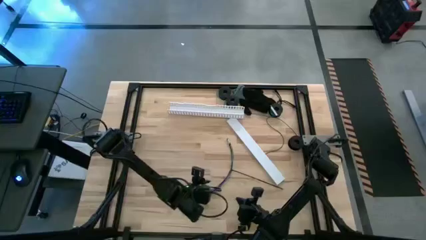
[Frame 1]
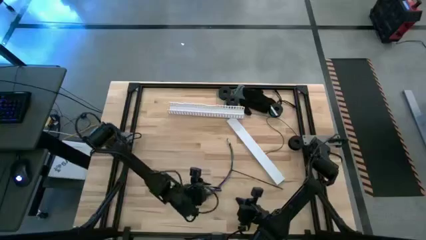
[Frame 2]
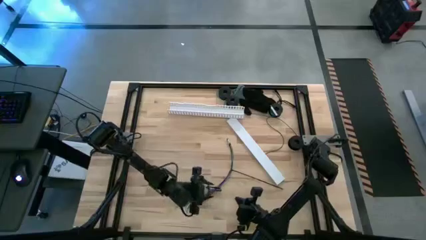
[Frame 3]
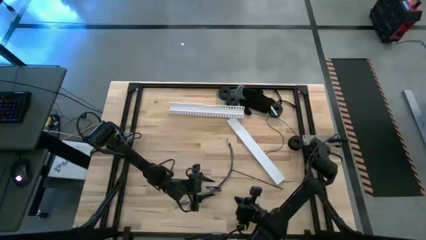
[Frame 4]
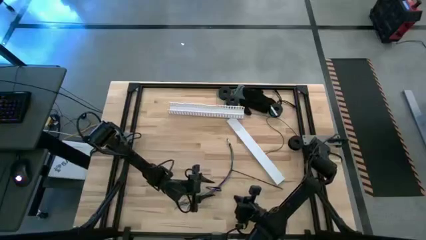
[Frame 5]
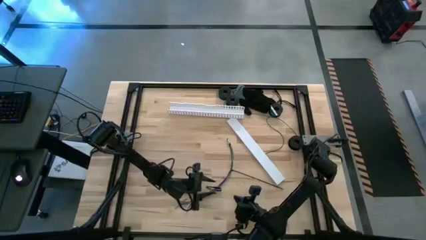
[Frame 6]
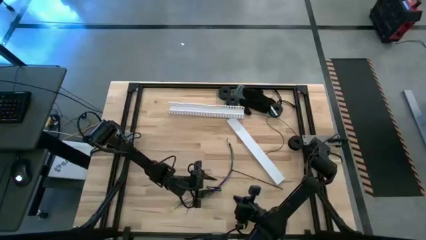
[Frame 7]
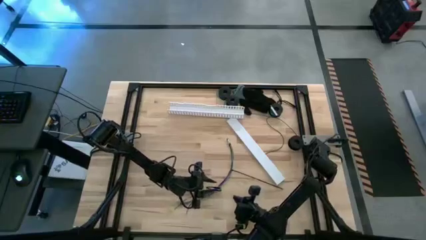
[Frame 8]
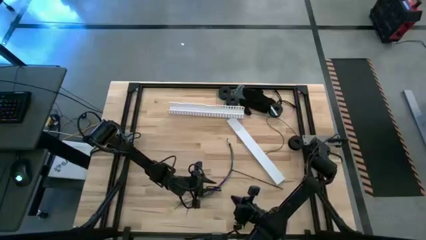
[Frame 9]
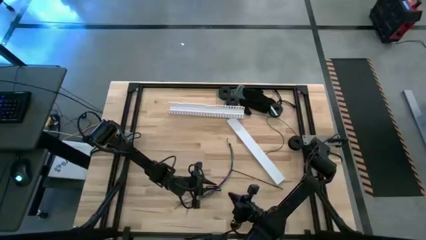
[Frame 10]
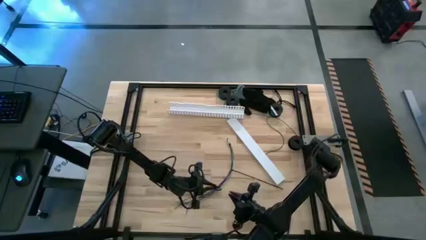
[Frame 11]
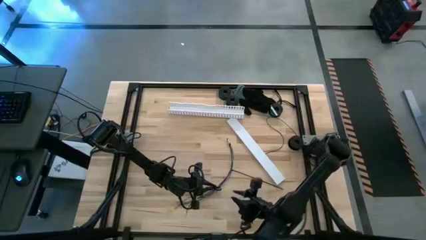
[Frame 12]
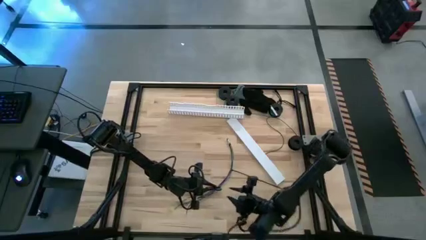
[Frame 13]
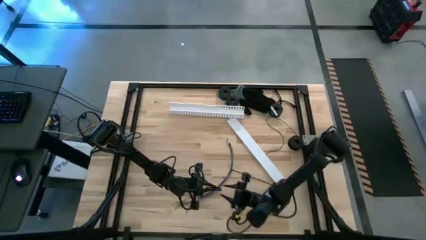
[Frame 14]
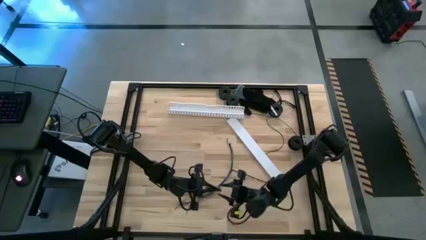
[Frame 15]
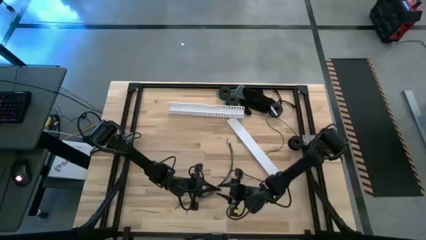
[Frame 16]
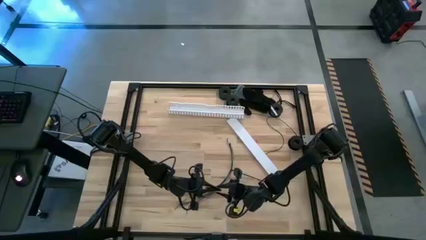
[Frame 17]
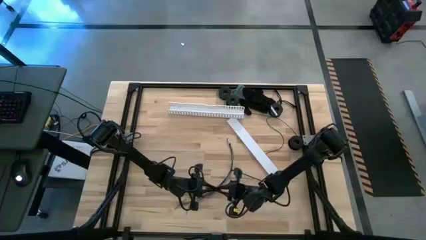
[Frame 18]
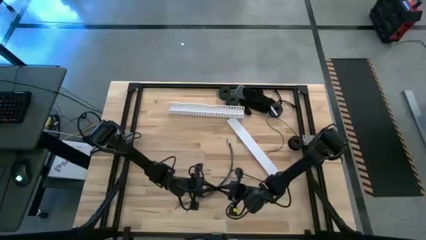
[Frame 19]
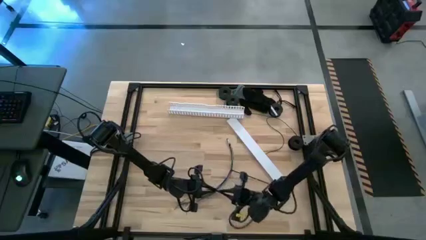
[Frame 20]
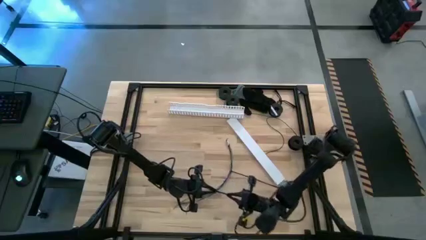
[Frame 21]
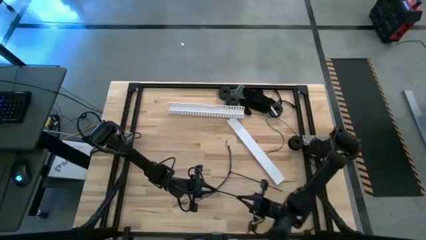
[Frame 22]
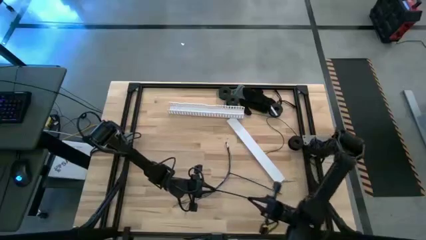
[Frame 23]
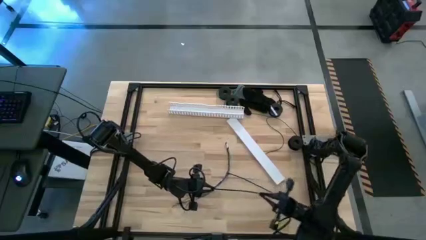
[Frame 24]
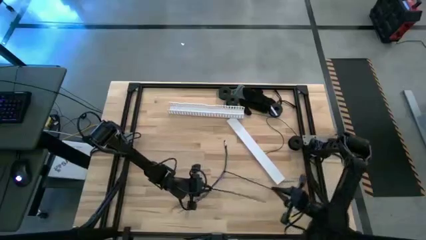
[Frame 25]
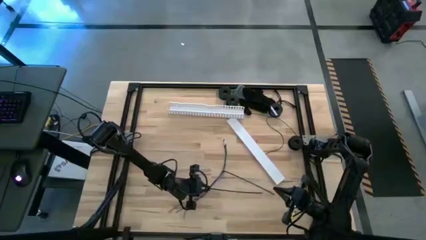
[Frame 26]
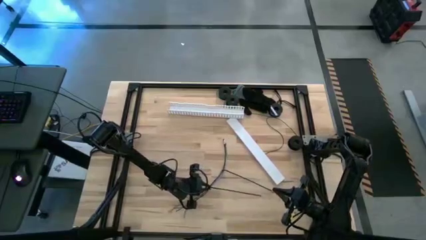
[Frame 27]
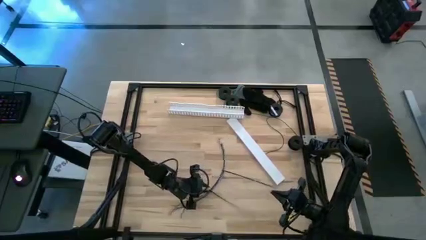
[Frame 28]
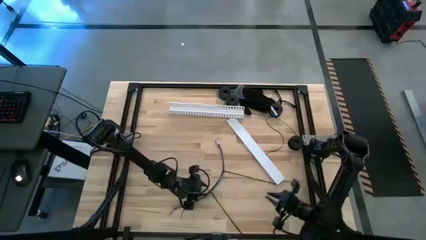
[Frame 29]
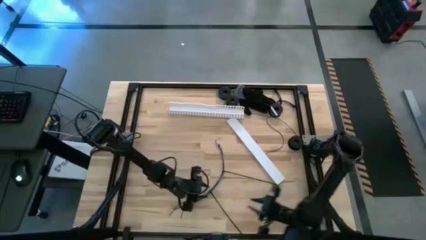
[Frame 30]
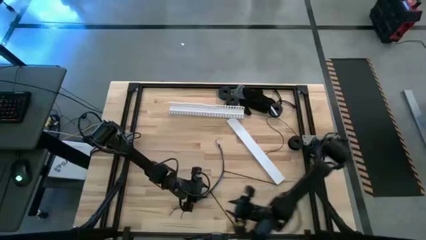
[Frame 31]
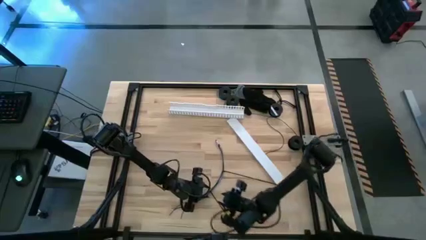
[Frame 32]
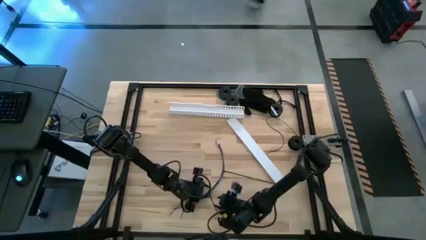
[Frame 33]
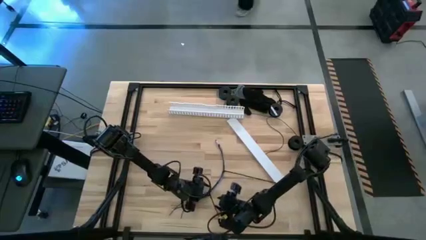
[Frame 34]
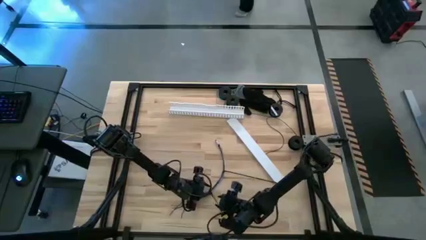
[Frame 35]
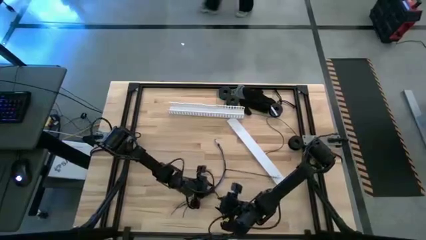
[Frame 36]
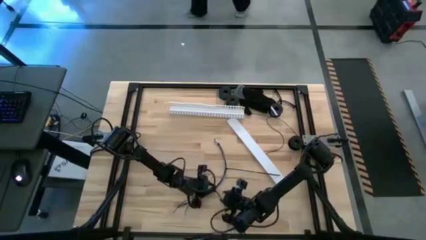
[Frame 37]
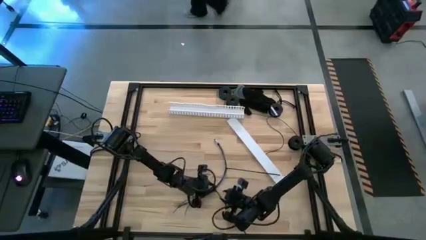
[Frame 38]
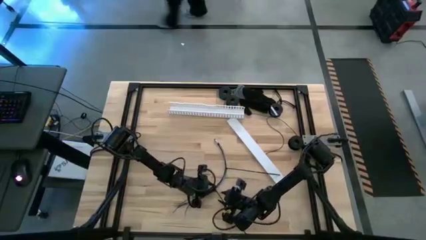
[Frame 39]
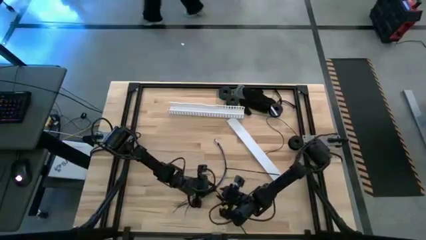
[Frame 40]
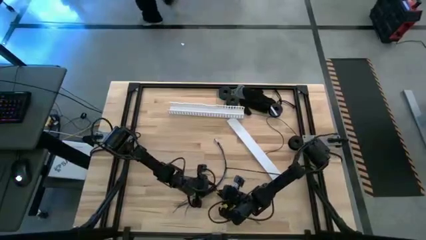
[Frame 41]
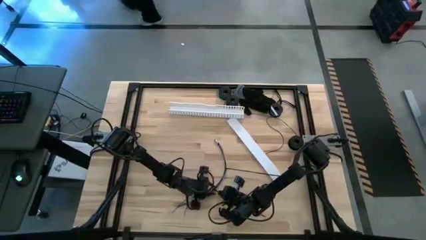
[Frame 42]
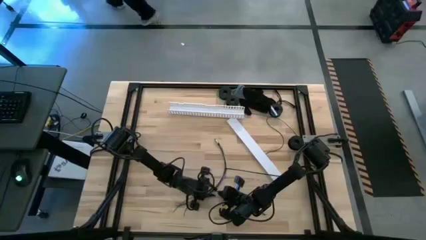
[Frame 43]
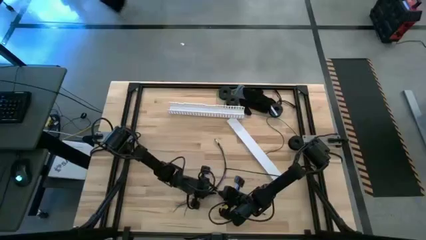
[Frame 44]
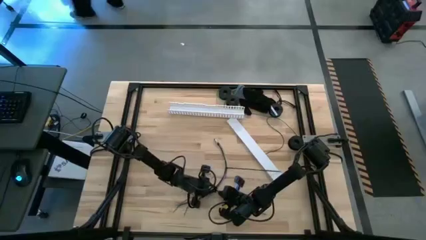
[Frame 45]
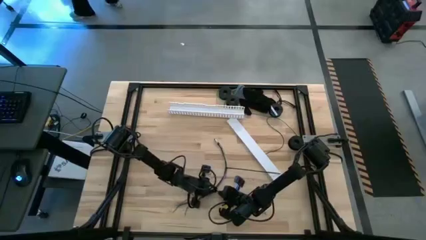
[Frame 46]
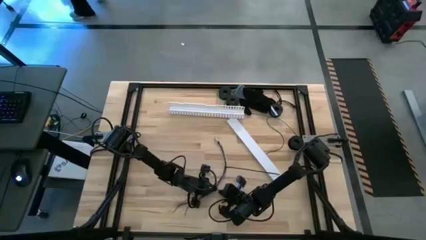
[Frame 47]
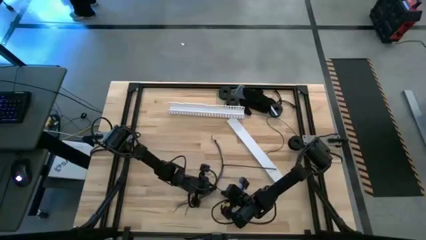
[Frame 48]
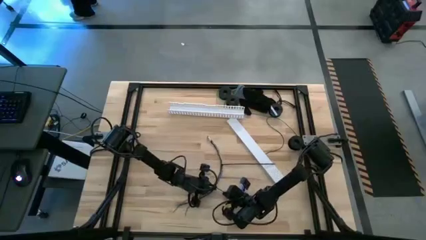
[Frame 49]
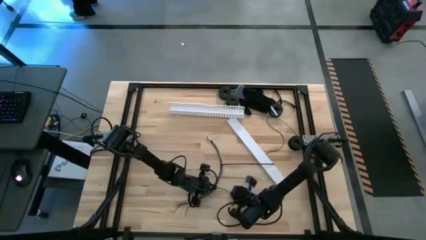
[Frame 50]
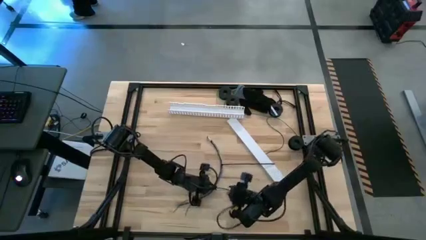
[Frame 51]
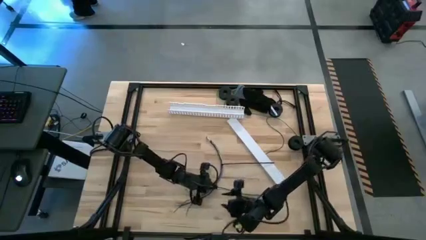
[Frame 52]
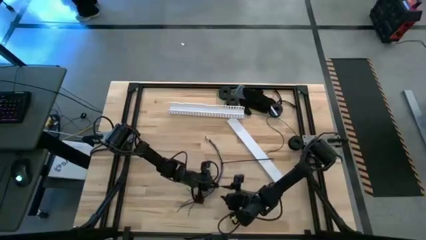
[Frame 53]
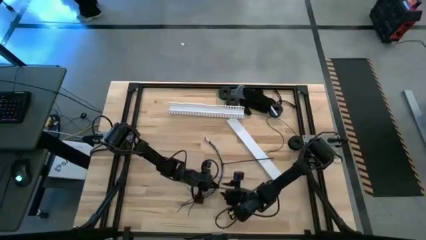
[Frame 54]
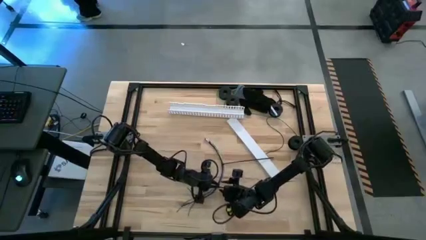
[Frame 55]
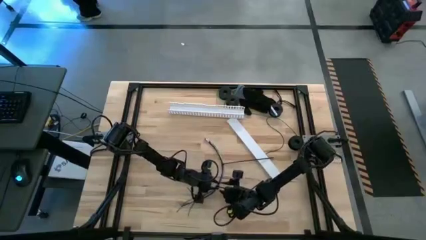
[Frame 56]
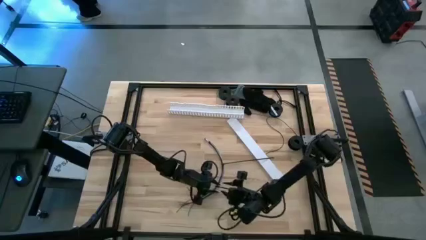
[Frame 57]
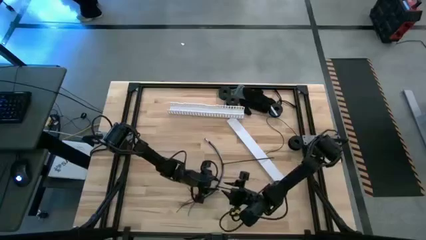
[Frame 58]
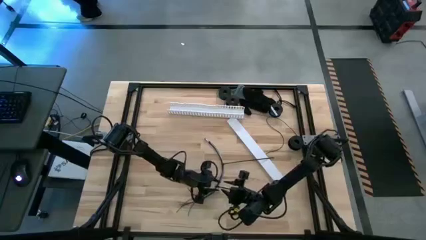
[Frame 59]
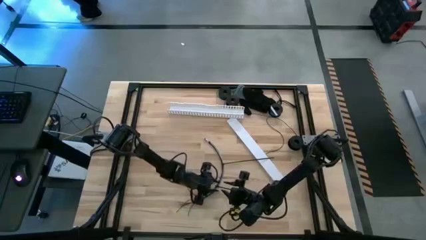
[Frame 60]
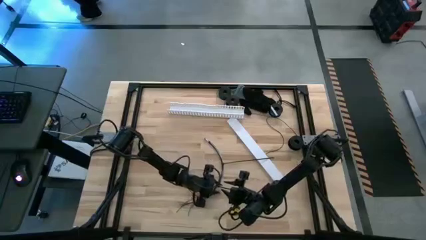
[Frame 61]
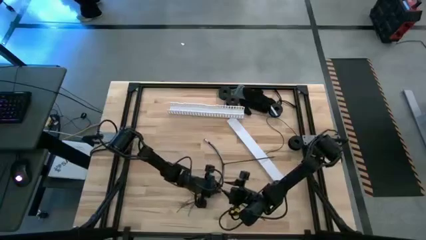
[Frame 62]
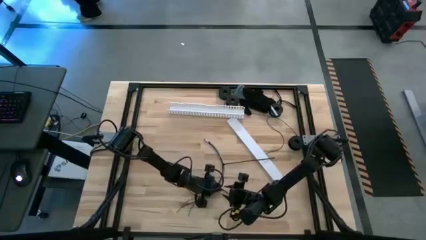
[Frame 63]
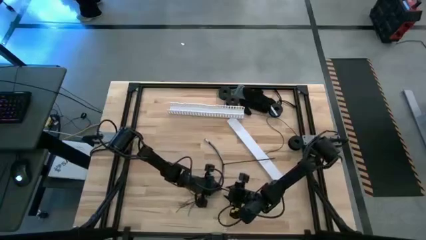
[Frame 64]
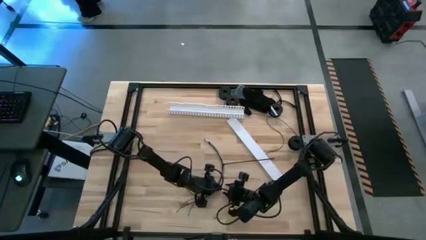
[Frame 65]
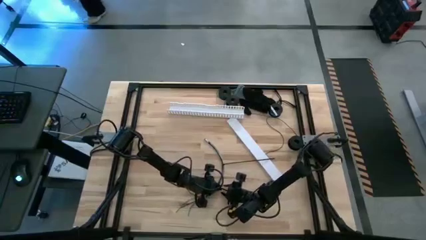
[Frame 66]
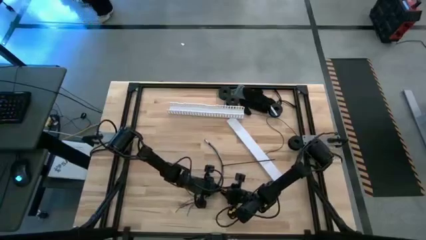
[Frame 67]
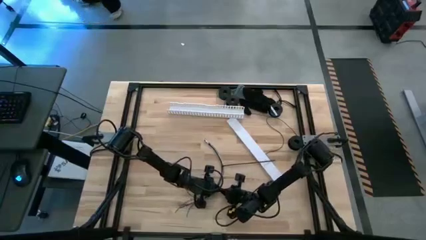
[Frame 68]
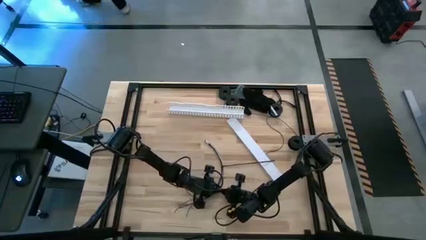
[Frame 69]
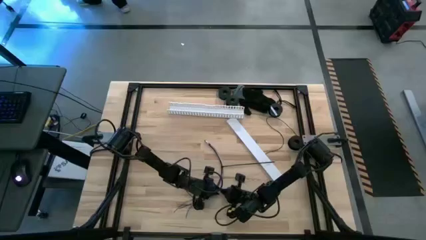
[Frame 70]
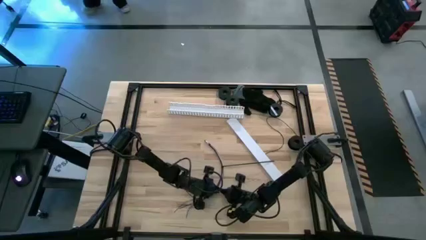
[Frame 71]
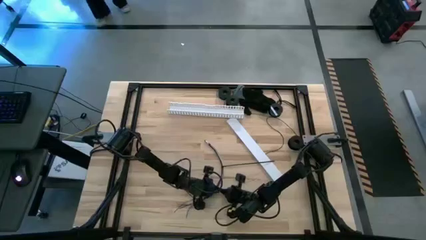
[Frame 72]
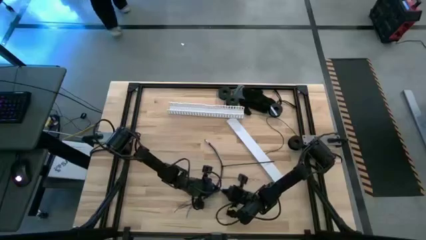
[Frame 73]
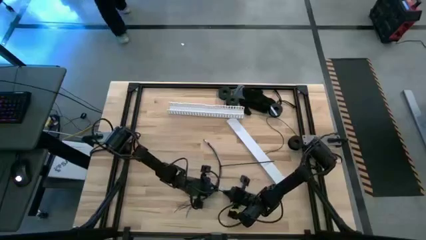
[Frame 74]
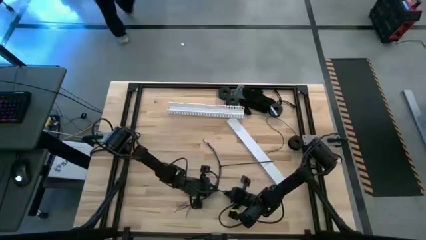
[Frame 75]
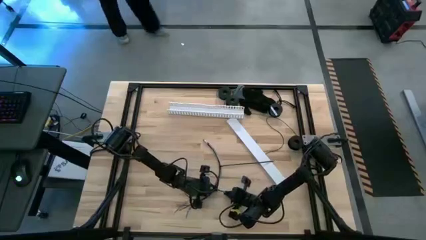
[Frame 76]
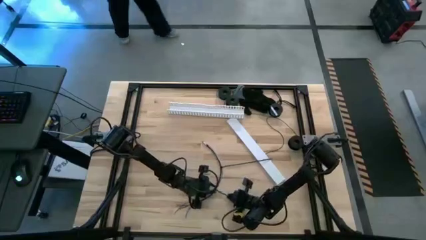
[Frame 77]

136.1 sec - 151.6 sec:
Task: Ziptie cables
Wrap the wire cables with the black zip tie
